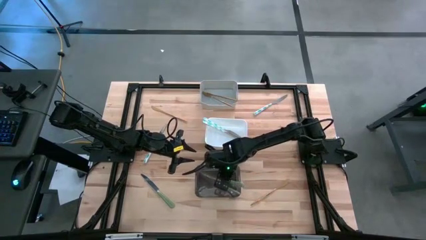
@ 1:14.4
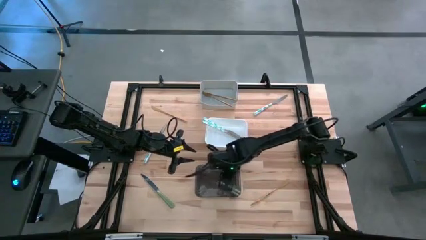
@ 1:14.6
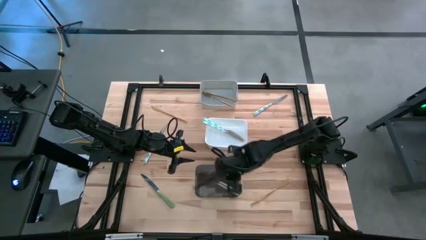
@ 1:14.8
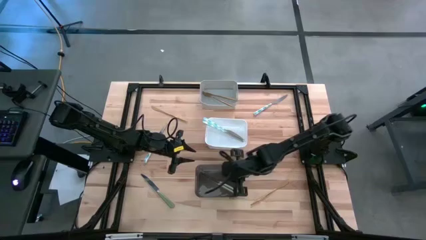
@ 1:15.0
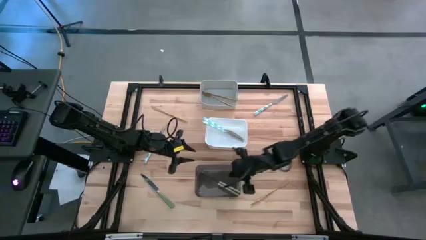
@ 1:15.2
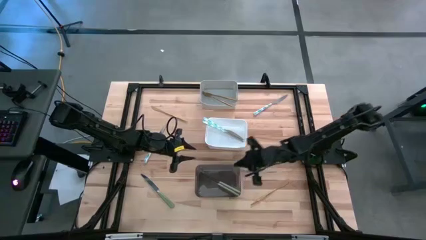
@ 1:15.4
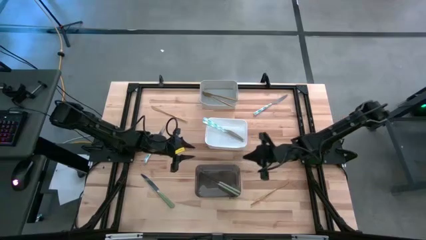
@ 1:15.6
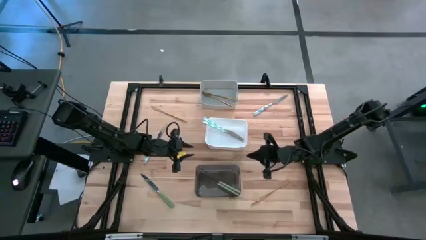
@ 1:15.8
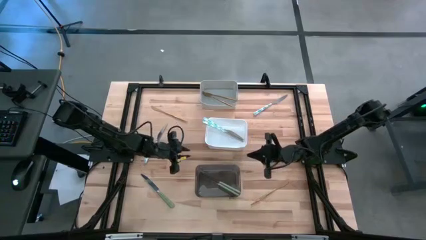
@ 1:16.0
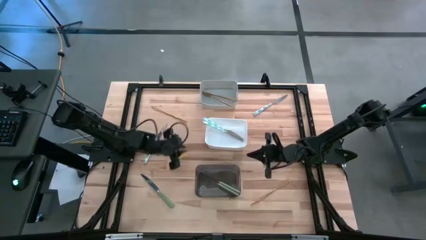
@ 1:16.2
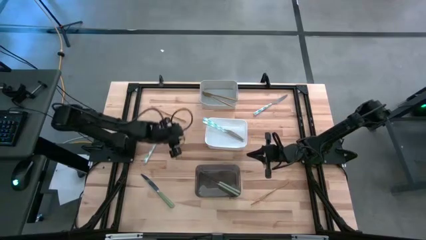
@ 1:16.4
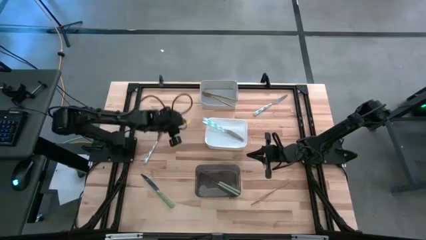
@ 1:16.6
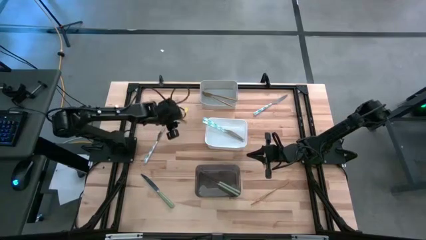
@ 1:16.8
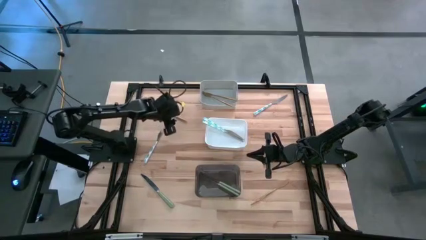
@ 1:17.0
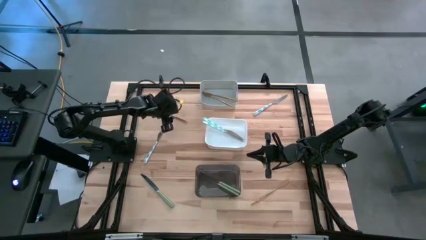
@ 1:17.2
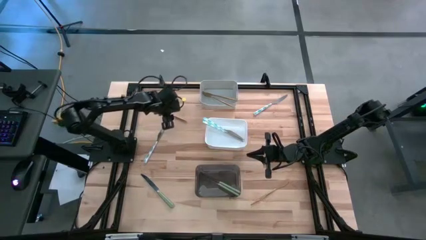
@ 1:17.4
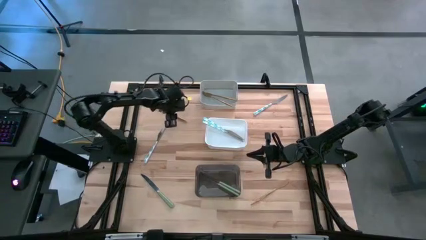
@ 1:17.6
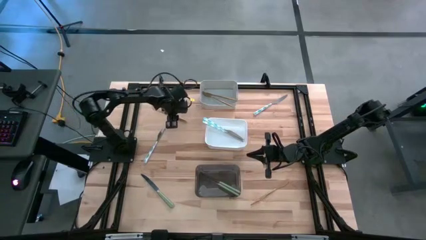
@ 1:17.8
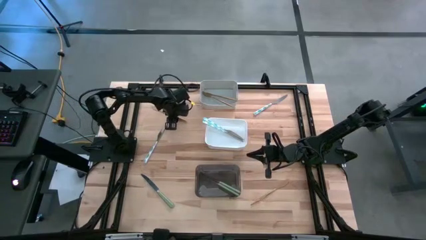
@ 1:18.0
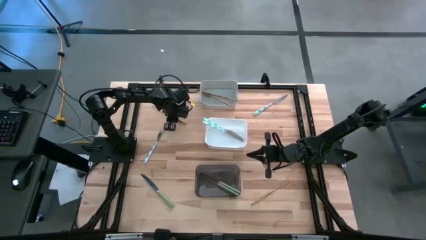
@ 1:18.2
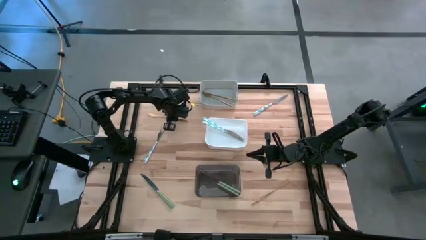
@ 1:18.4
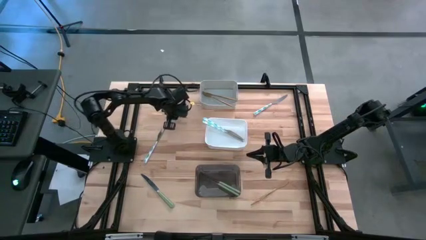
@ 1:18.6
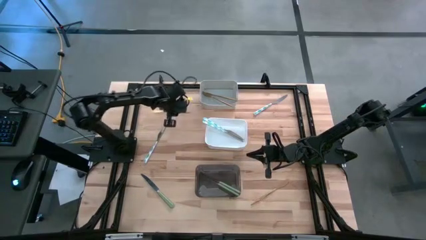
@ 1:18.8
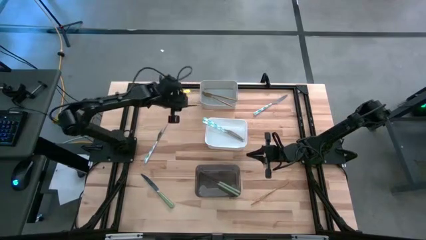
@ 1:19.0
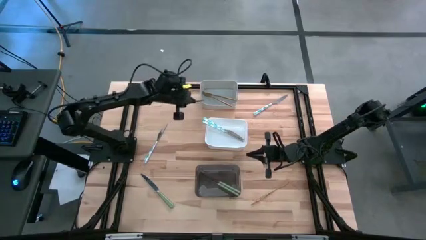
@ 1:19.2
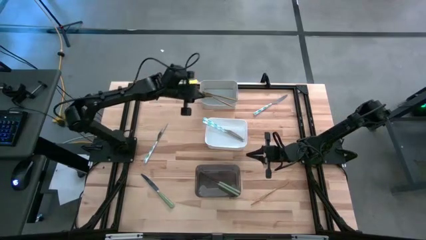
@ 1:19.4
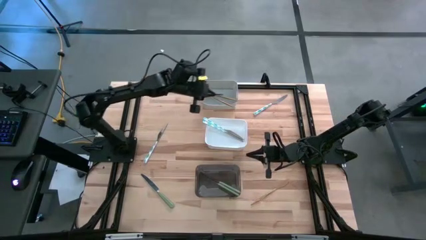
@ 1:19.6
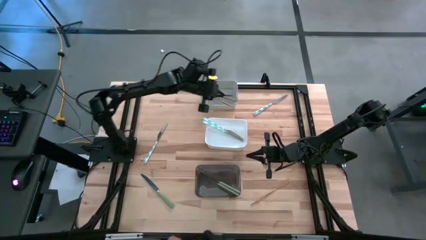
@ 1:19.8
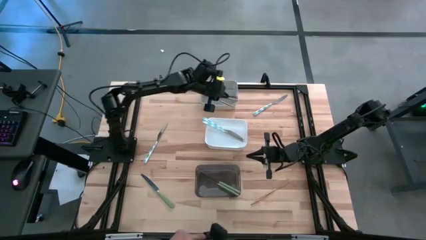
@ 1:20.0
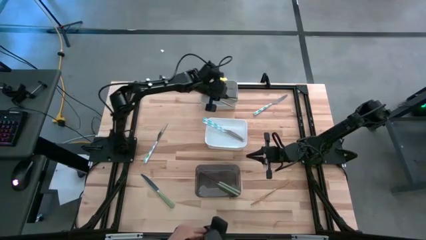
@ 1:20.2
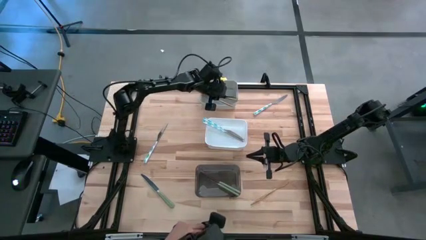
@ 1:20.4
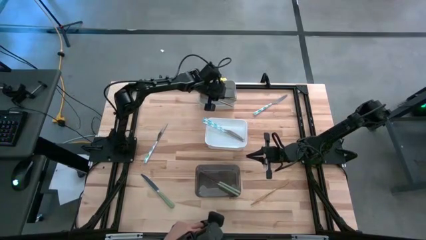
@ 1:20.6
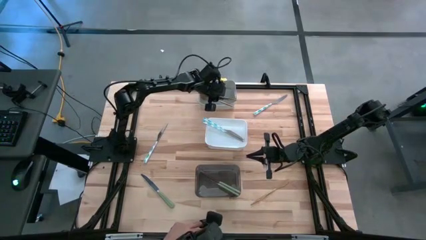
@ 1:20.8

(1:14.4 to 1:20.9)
Task: Sort silverware by color (type)
Put the gold table knife into the gray bin

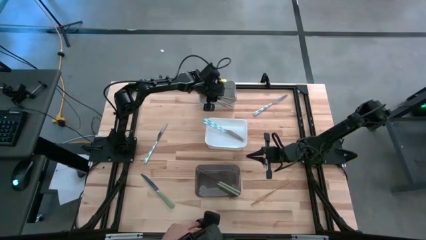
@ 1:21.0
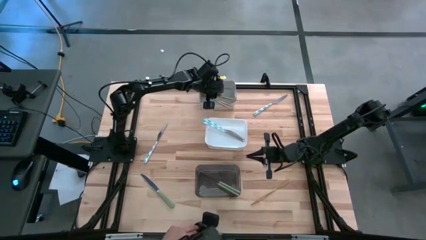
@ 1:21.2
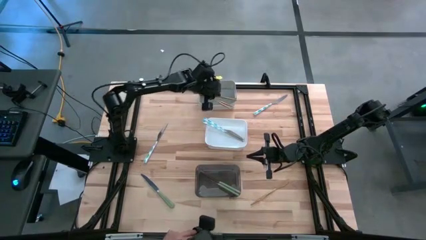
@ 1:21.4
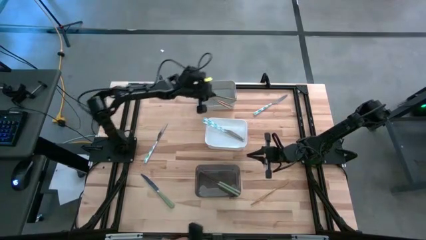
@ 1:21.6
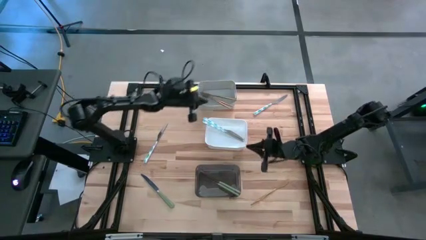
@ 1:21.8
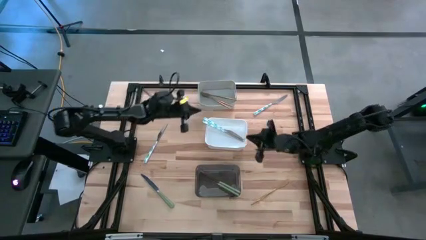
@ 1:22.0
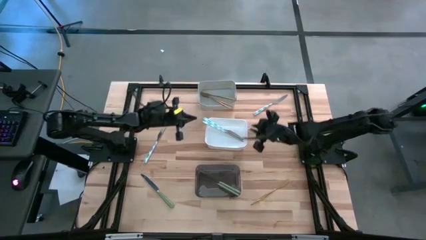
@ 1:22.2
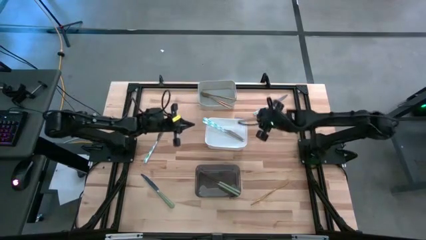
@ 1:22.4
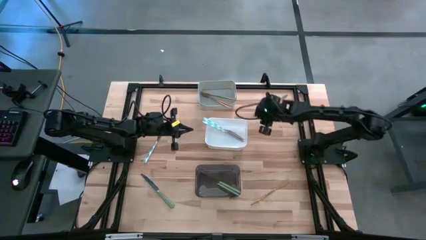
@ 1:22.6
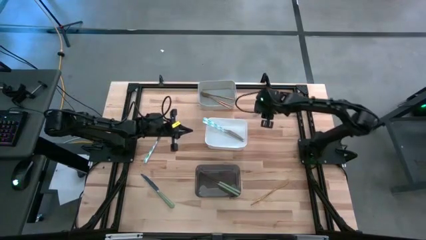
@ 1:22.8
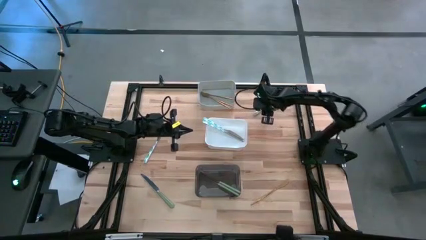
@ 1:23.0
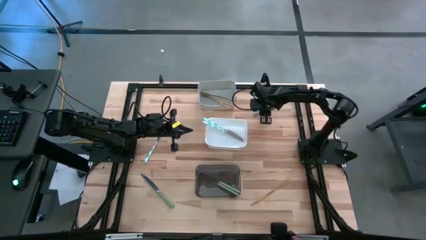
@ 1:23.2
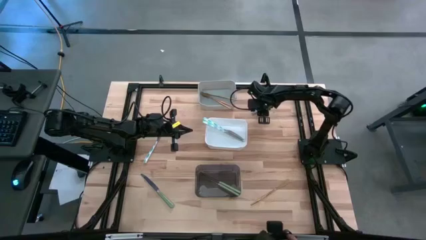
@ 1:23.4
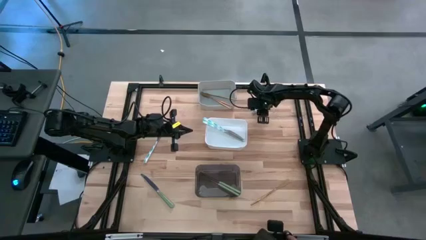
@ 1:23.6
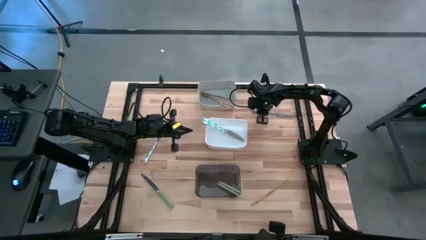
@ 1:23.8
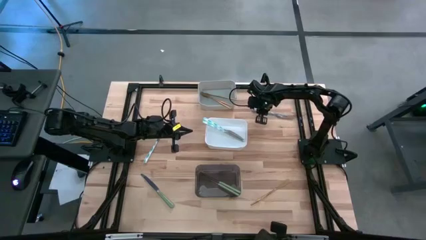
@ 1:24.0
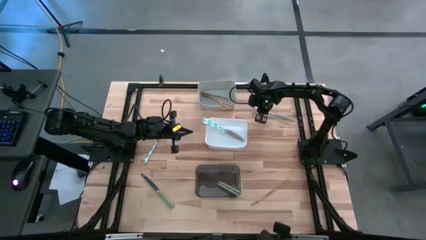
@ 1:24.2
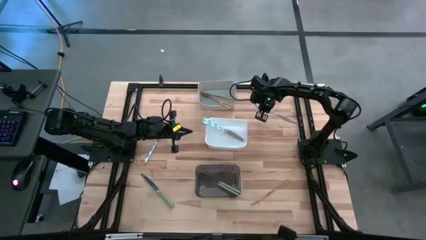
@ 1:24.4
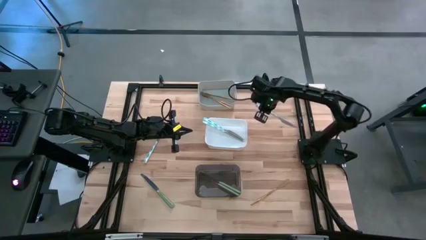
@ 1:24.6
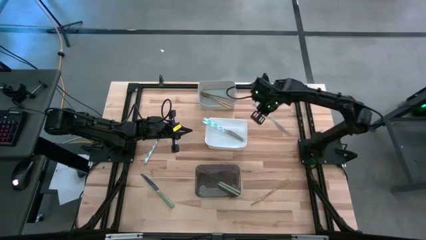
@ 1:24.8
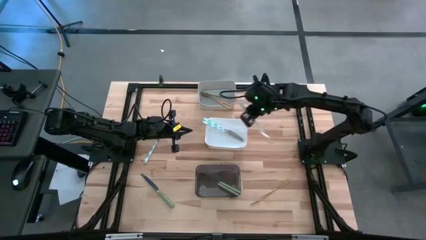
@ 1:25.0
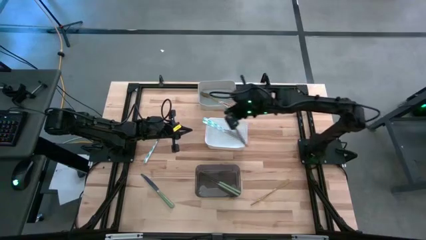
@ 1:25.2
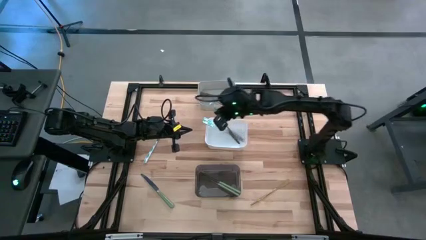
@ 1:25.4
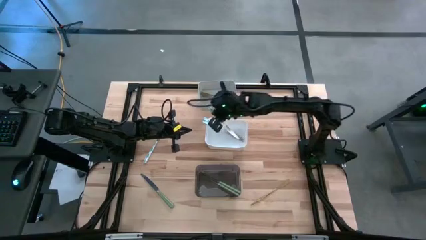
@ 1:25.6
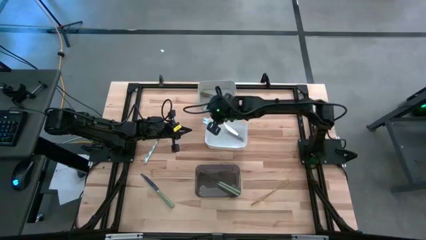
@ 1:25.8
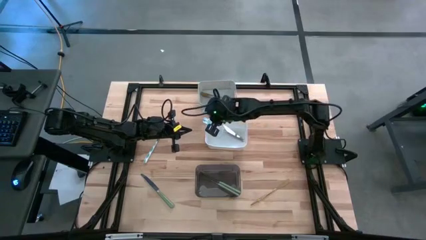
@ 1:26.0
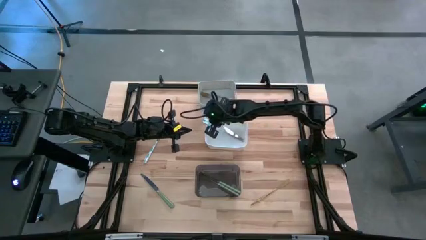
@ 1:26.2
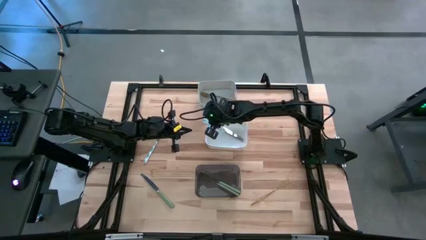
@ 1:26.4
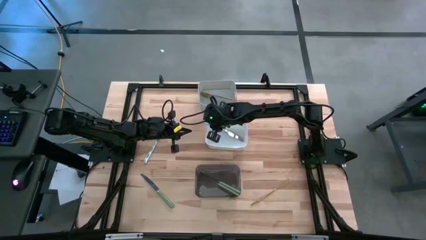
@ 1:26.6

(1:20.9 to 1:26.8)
Put the white-blue table knife into the white bin

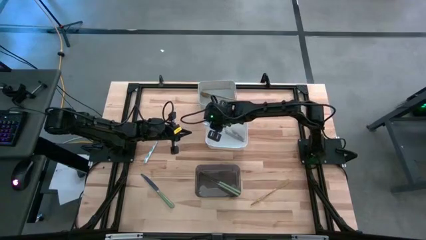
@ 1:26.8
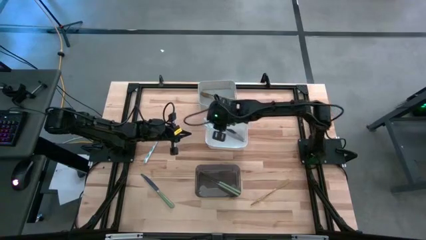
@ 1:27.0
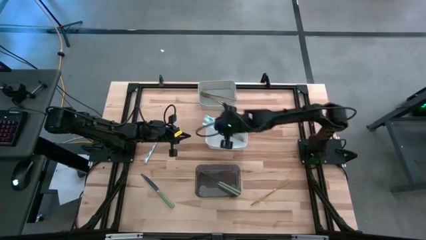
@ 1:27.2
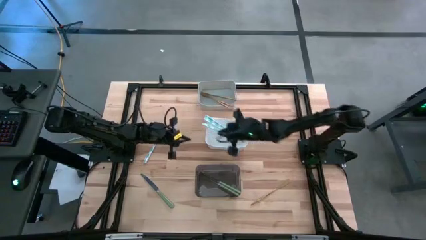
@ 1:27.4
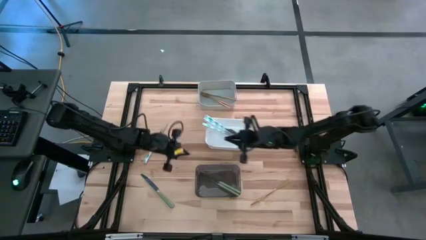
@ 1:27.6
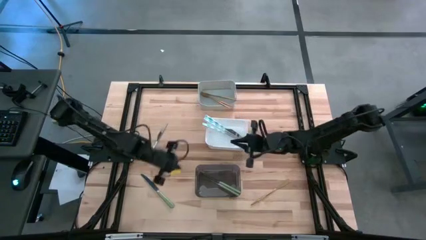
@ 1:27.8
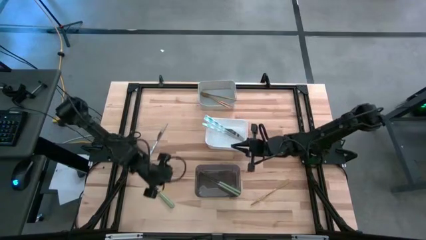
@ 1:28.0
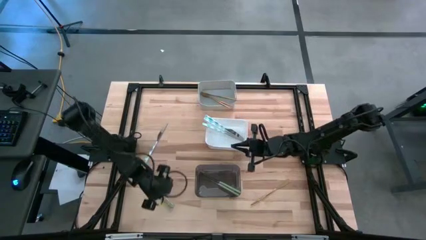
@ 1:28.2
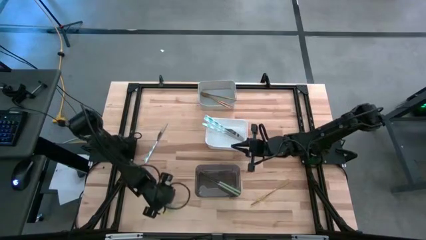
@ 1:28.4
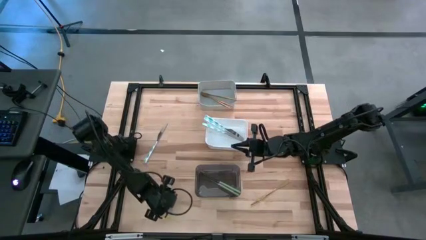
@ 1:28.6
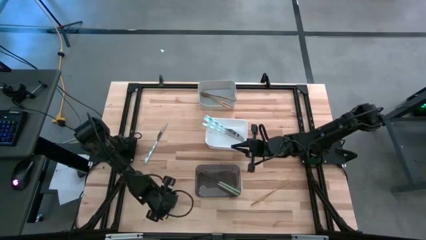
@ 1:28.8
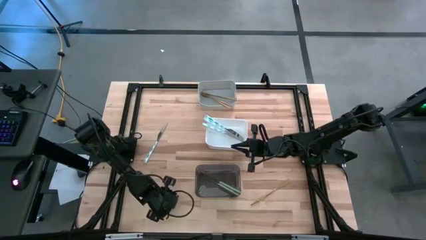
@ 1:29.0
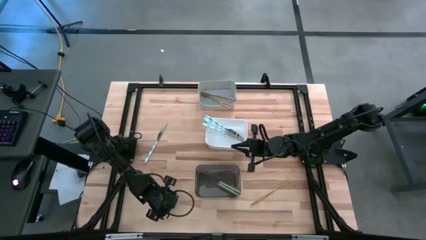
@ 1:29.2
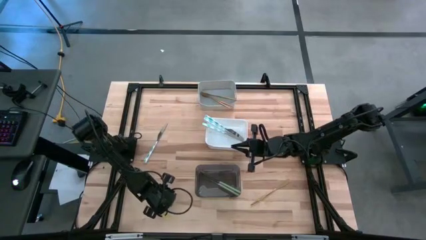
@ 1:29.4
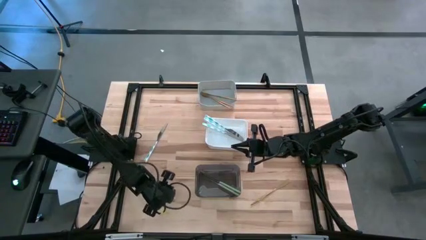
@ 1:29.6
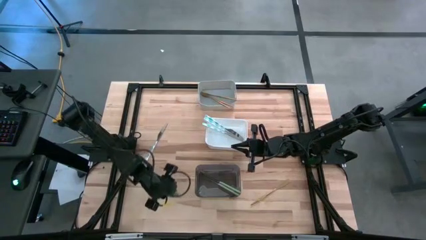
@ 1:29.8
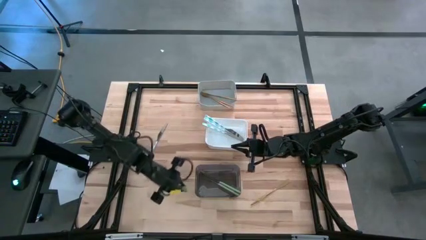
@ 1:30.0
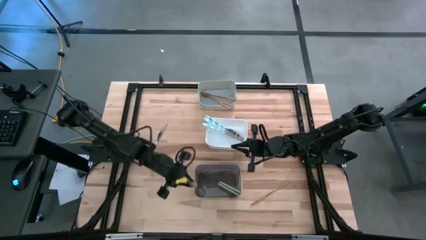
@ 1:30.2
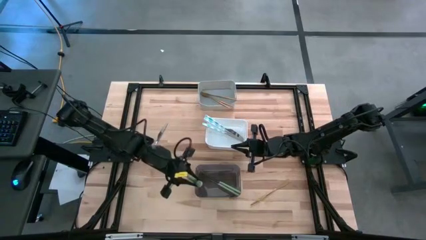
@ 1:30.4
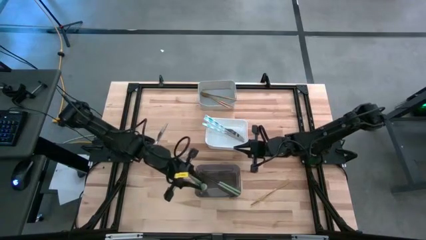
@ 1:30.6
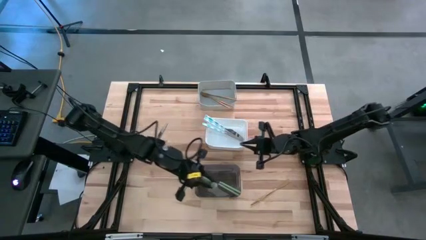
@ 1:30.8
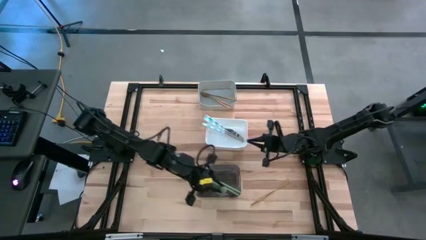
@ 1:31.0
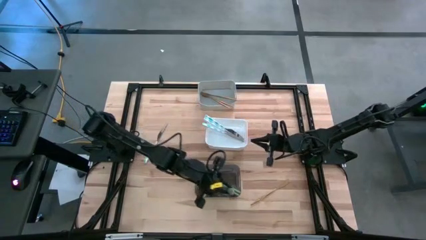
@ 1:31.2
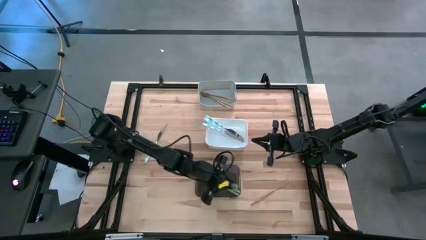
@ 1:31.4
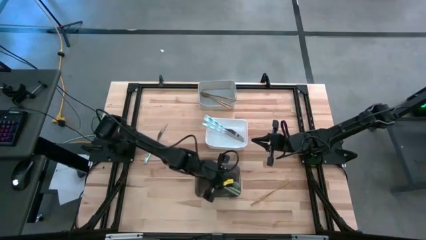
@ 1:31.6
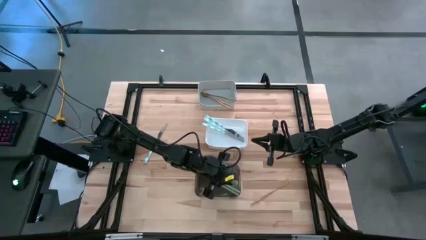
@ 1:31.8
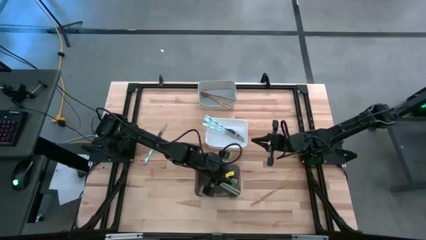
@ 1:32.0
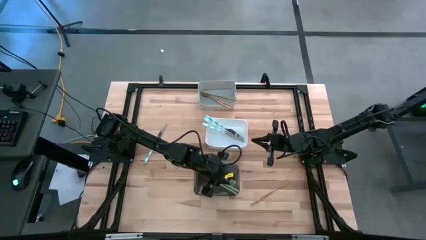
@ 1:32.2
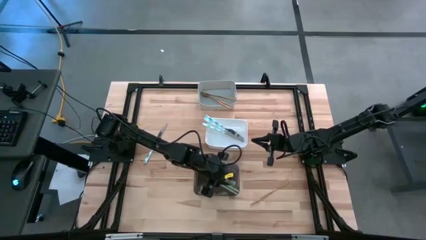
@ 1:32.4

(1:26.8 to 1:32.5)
Put the light green table knife into the black bin
